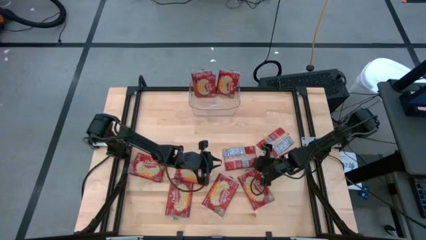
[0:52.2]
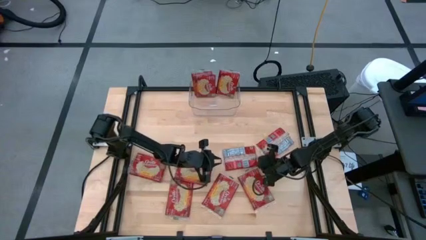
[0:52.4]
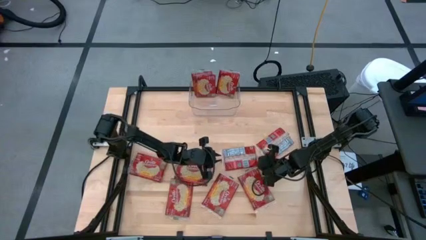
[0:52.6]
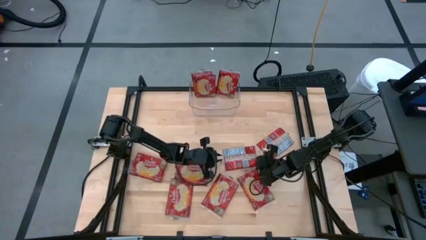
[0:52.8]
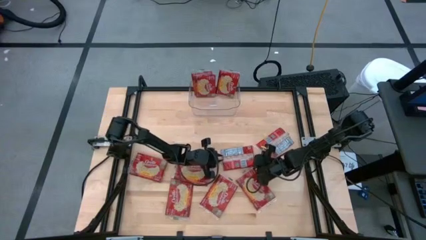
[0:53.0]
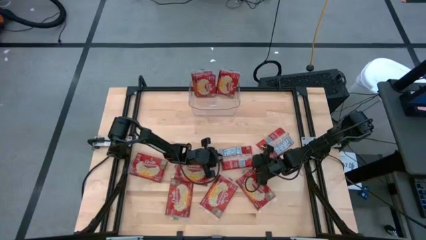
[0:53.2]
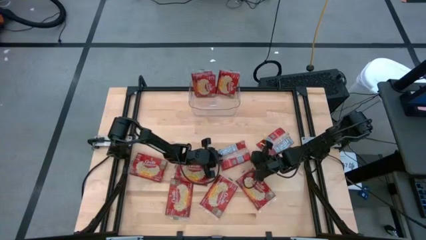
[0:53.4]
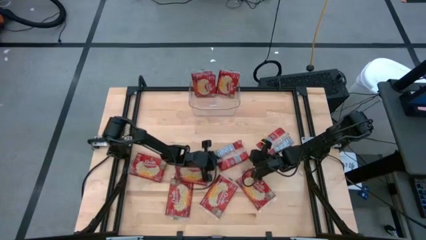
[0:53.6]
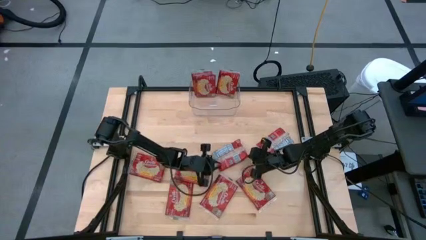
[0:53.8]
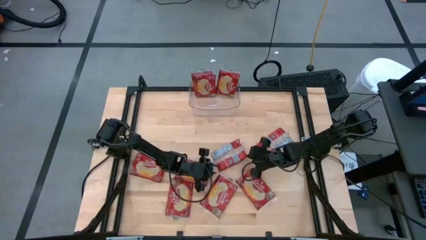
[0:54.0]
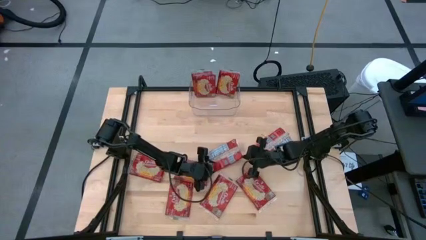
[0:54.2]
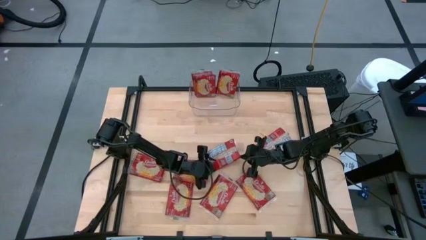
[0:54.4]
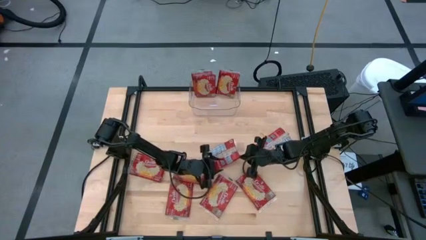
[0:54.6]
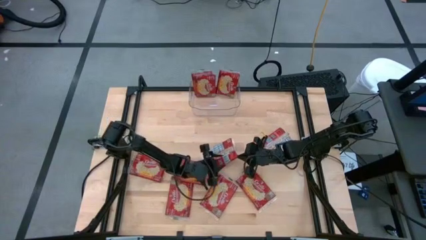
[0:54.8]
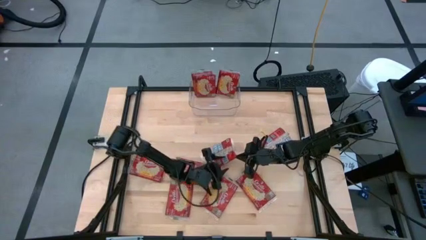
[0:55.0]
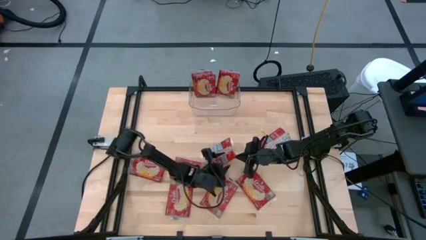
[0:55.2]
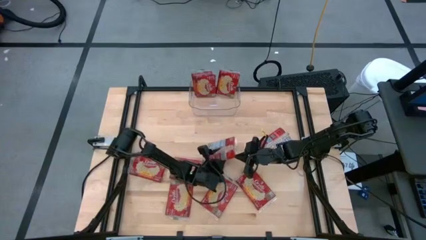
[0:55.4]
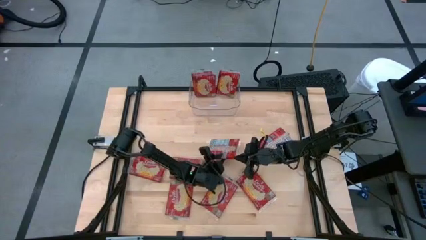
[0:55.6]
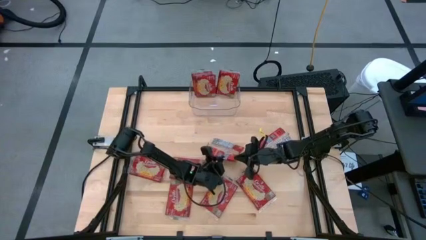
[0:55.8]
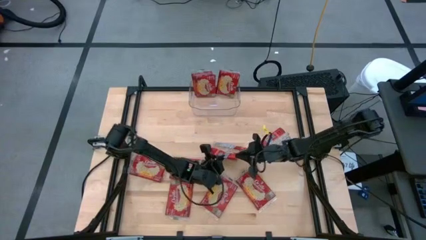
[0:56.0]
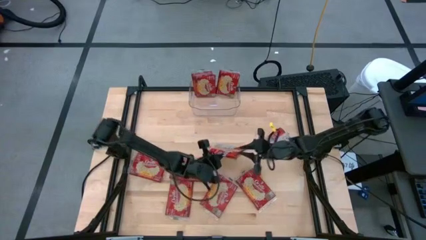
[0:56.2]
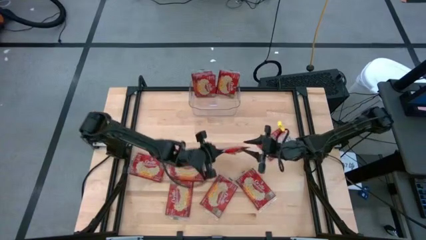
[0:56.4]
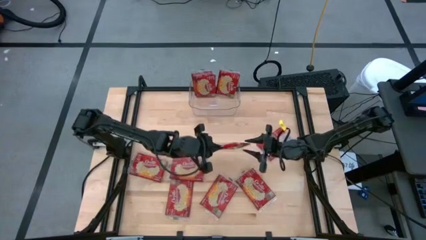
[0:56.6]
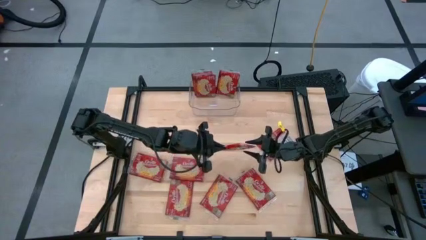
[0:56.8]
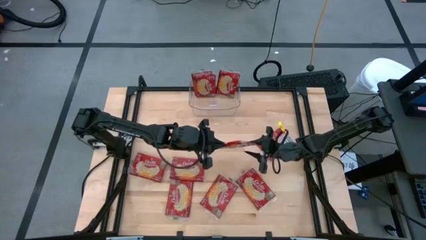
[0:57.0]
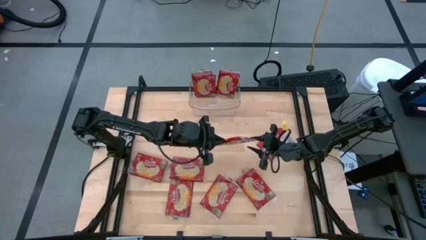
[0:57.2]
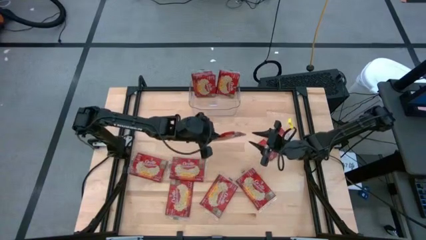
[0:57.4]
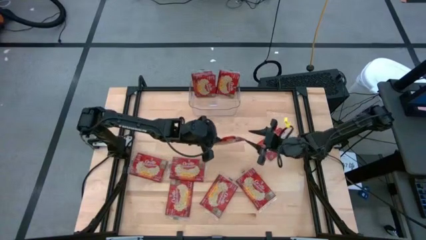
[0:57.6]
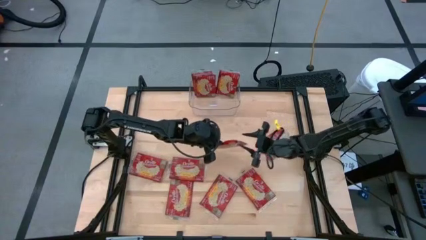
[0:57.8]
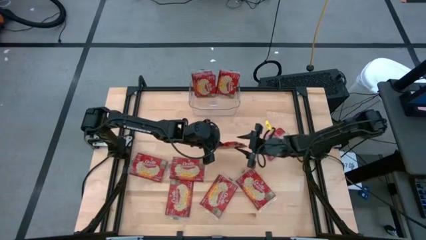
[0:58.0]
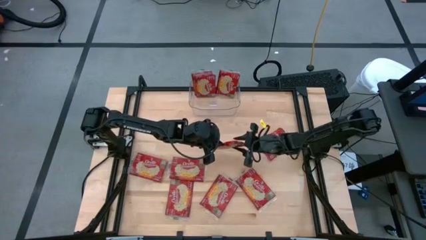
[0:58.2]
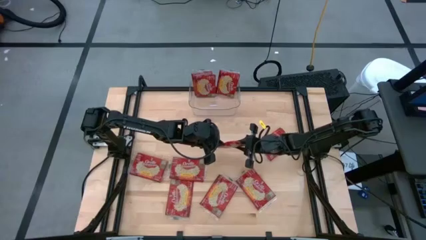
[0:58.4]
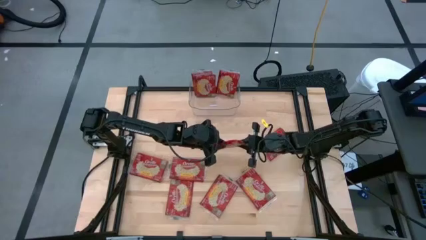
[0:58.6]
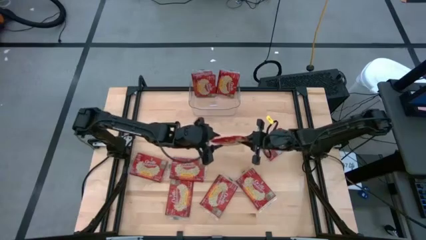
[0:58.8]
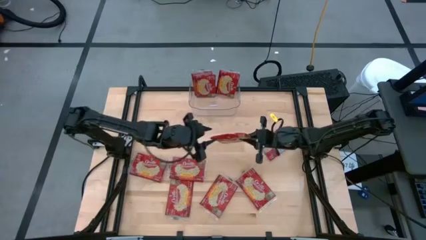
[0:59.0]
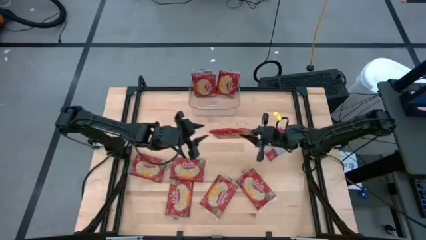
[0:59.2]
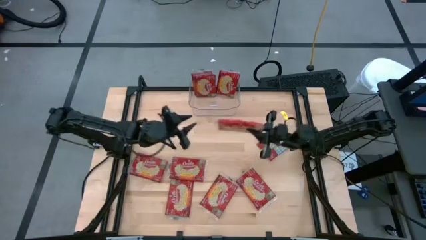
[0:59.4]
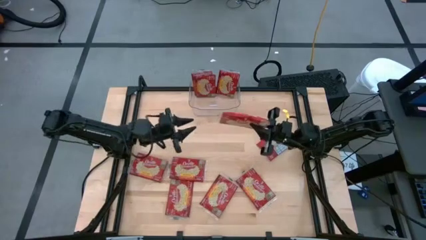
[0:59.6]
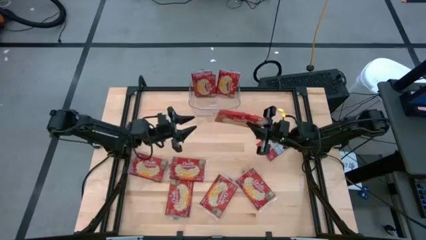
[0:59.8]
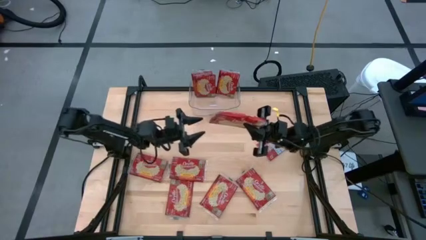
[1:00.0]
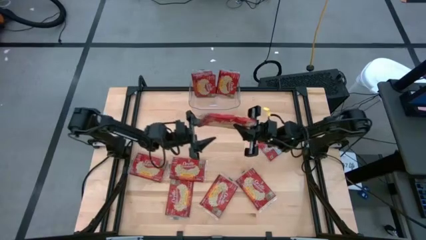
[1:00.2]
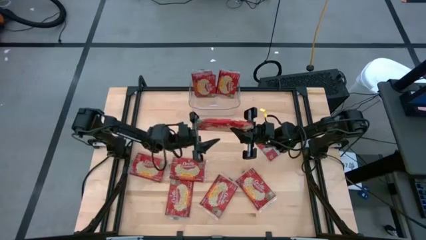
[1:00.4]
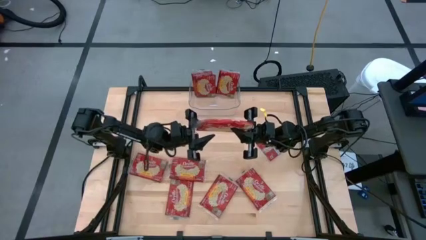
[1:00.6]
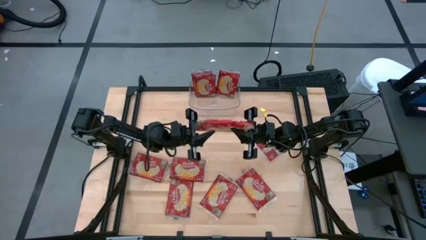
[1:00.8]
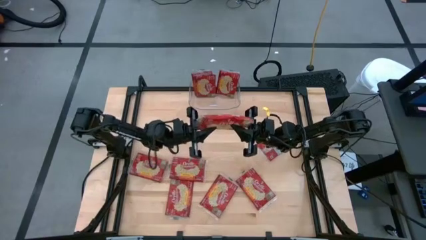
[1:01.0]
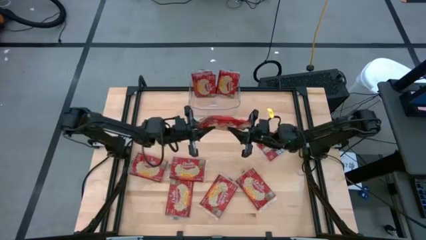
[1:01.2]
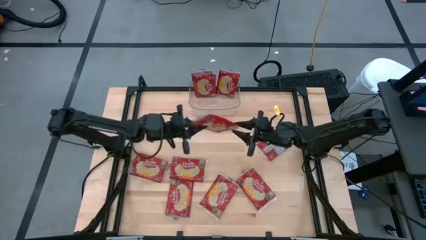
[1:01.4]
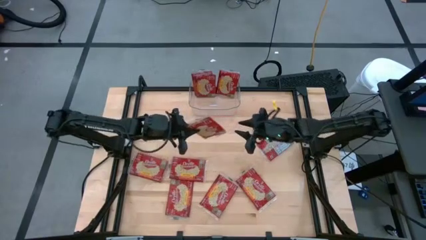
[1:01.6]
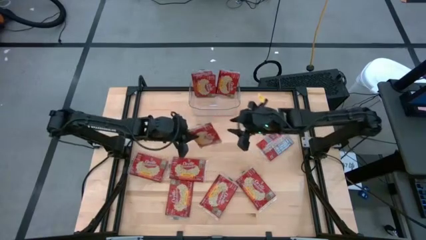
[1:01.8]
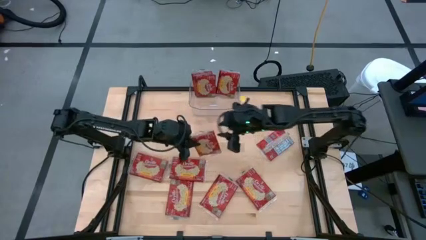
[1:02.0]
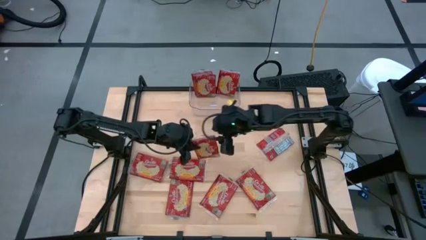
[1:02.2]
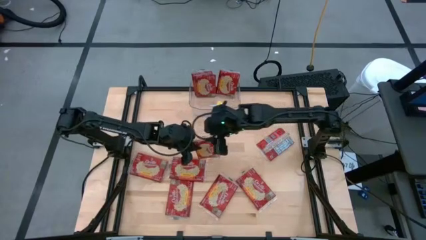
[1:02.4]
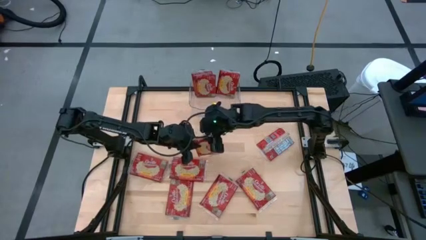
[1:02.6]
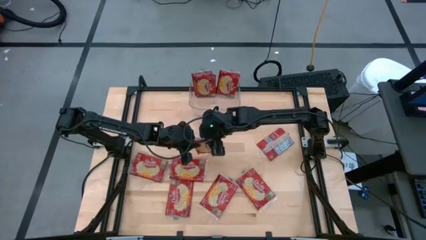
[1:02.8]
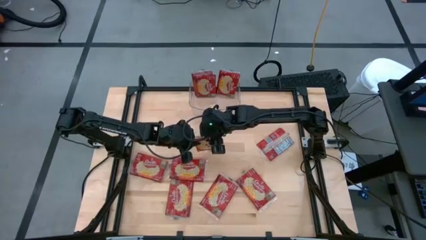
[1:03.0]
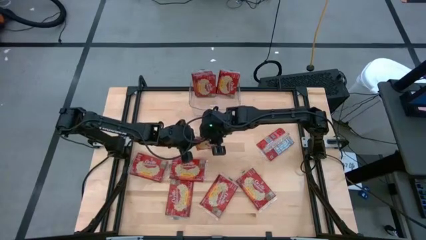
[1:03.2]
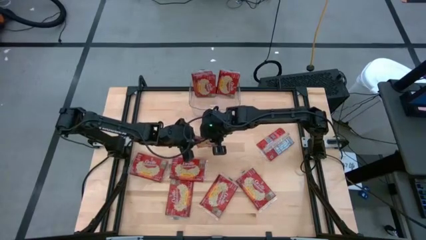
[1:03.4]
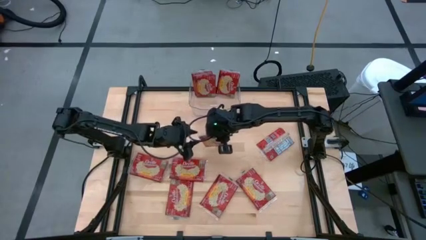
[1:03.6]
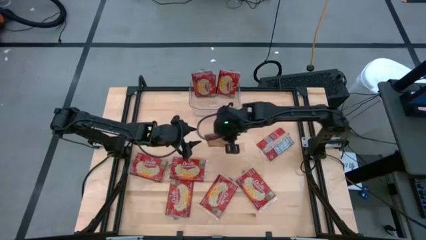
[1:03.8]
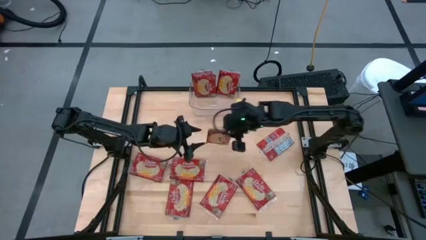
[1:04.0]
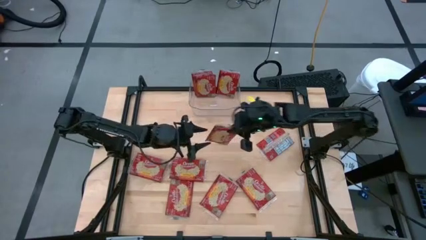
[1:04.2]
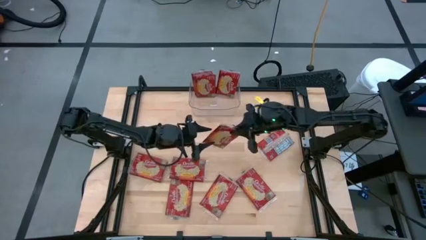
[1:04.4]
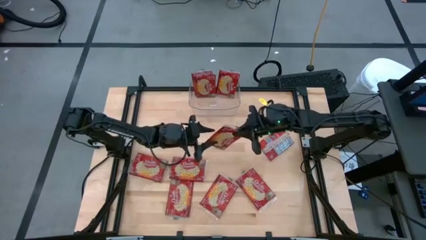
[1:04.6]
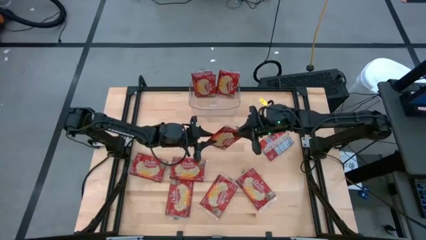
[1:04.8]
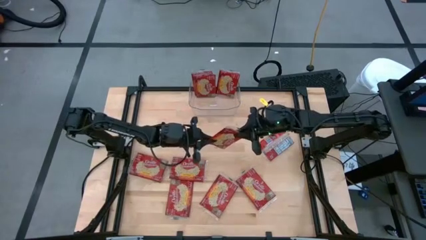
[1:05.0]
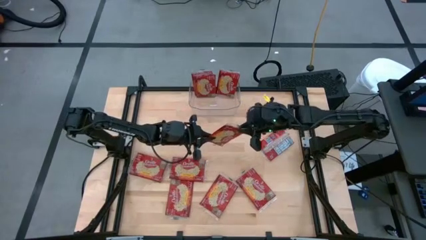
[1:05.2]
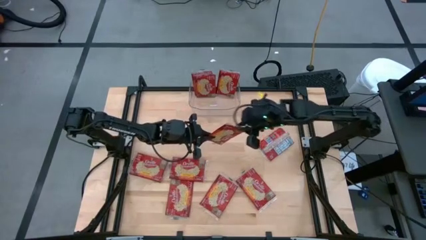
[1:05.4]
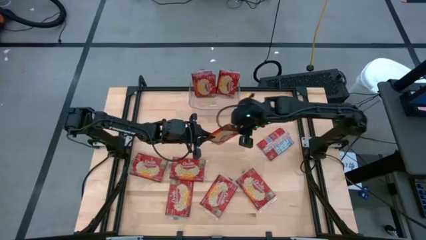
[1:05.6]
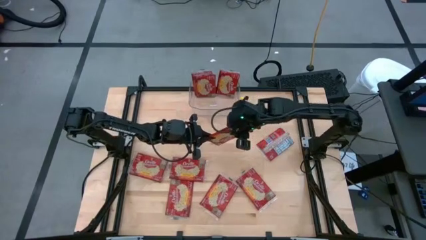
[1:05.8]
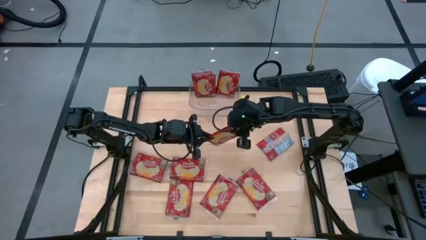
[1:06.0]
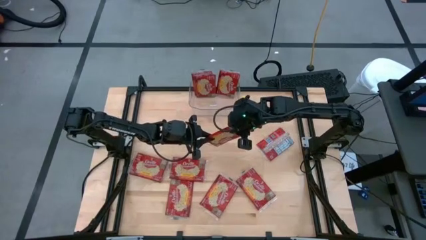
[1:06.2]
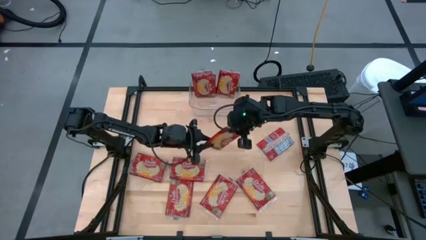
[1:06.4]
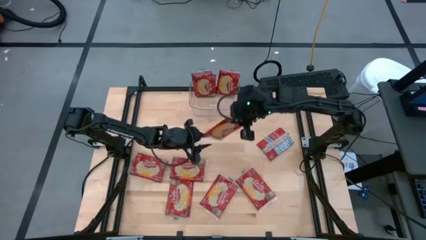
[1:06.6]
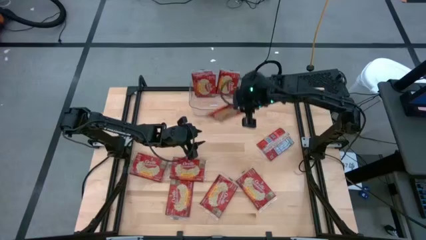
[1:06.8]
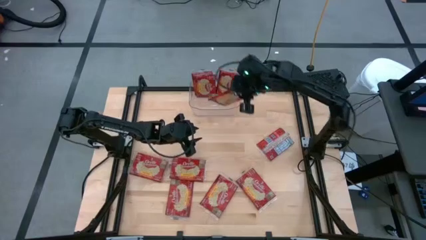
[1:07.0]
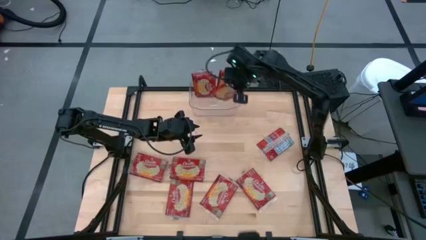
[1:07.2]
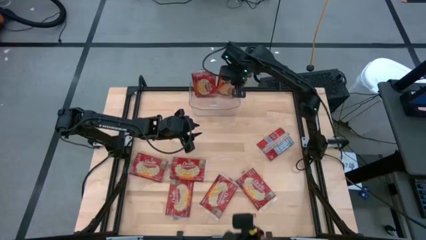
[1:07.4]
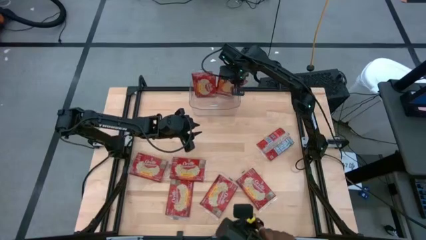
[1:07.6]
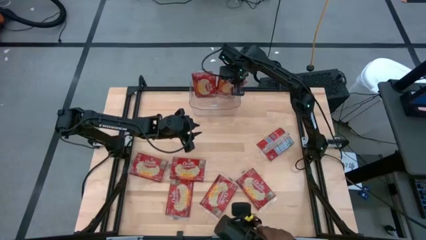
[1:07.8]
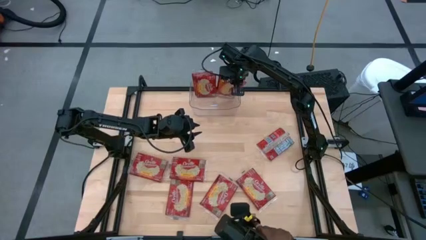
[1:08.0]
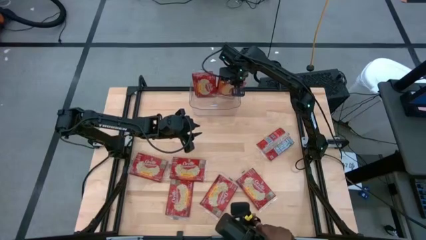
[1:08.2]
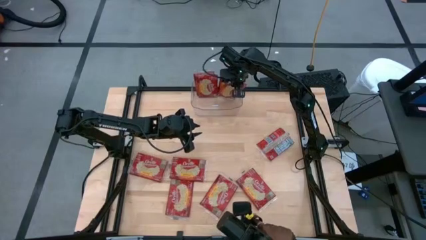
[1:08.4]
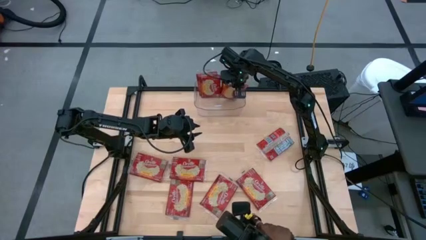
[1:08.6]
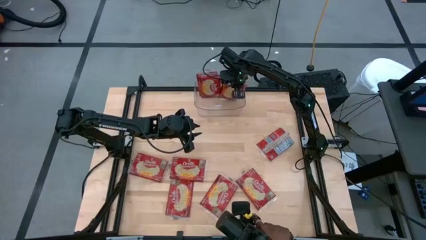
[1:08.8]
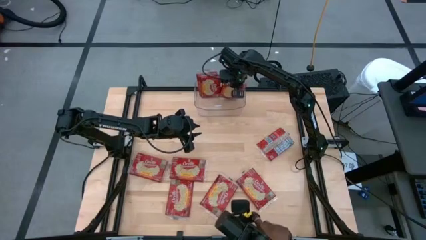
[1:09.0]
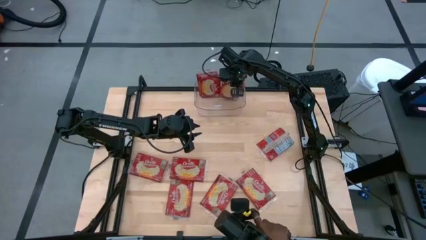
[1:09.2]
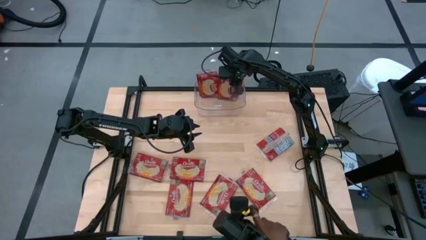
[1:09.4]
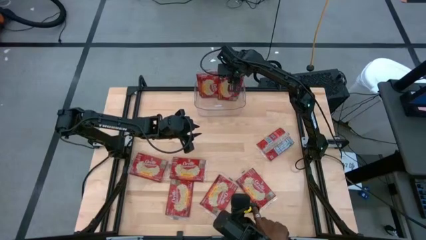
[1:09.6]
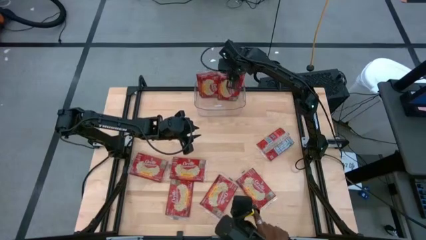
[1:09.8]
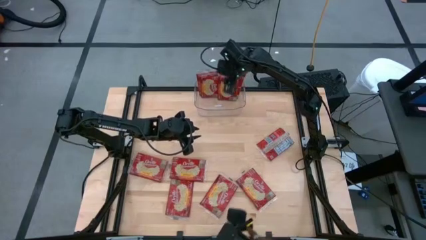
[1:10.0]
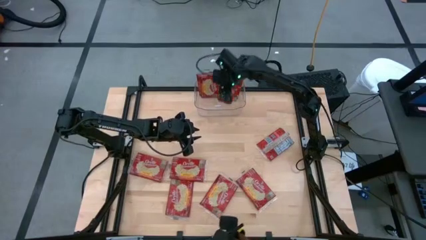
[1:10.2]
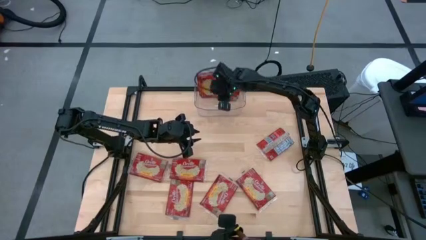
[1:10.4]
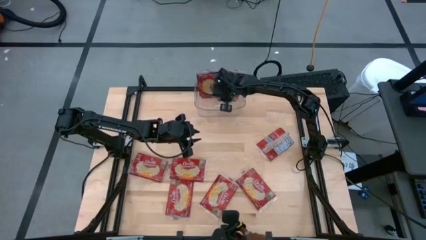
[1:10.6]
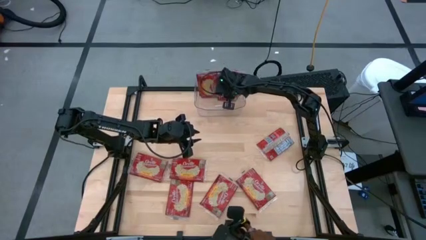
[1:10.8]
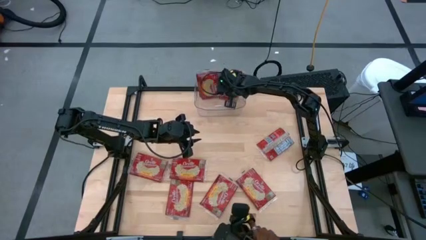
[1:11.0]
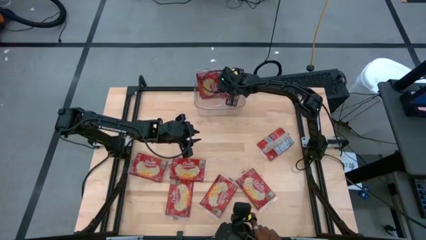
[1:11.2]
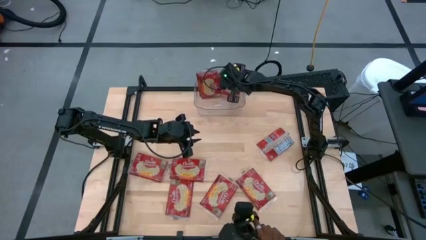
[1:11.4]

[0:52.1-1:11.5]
Task: Sort popcorn bags into baskets
Put the red popcorn bag into the transparent bin
